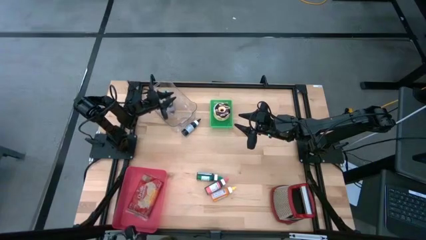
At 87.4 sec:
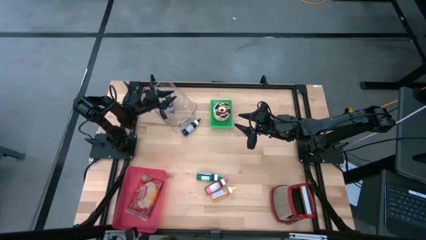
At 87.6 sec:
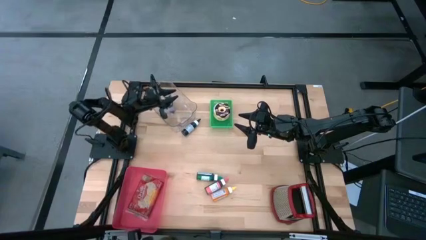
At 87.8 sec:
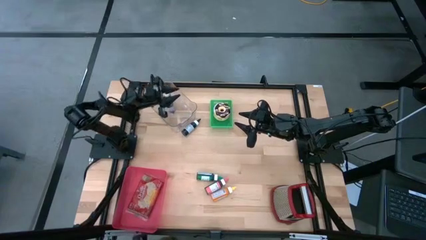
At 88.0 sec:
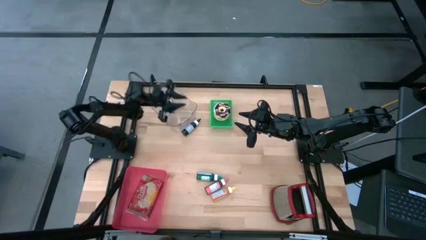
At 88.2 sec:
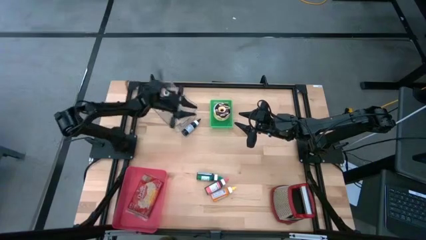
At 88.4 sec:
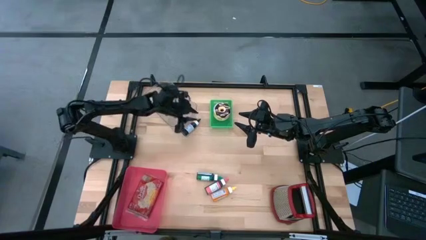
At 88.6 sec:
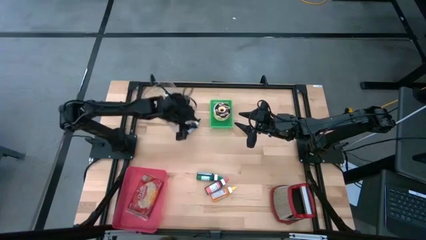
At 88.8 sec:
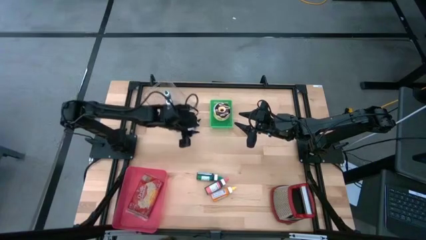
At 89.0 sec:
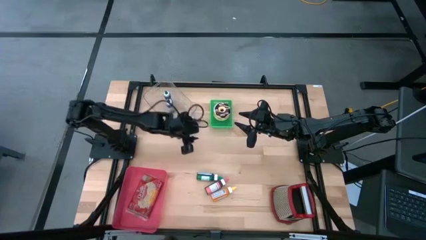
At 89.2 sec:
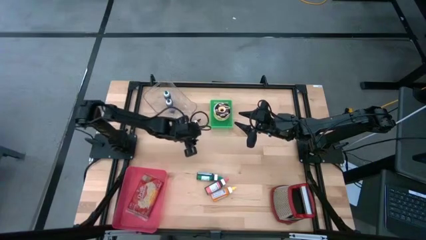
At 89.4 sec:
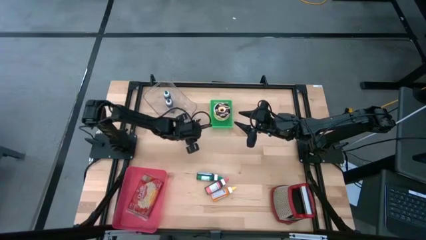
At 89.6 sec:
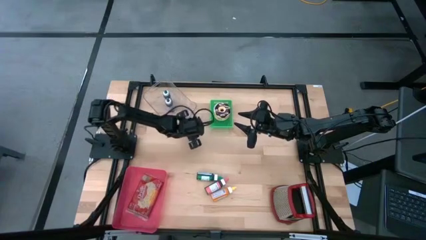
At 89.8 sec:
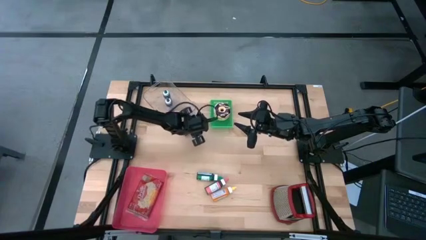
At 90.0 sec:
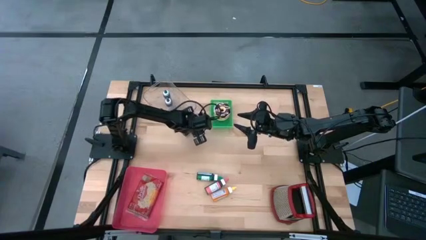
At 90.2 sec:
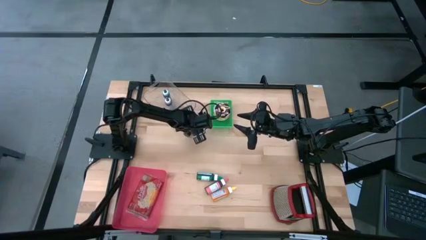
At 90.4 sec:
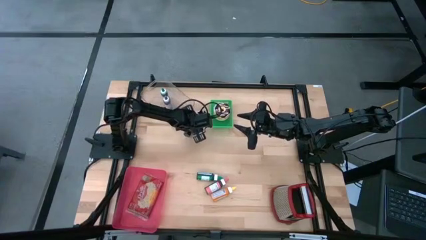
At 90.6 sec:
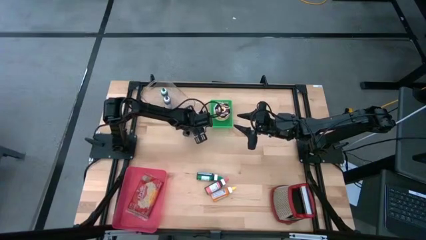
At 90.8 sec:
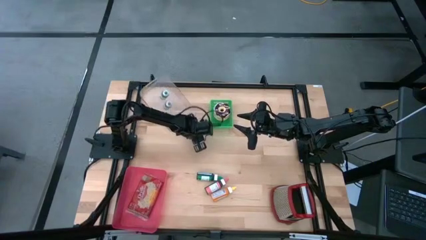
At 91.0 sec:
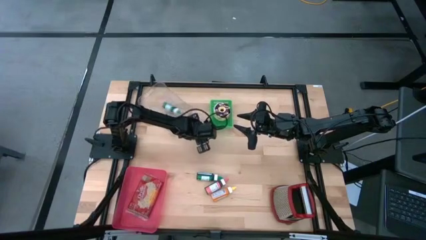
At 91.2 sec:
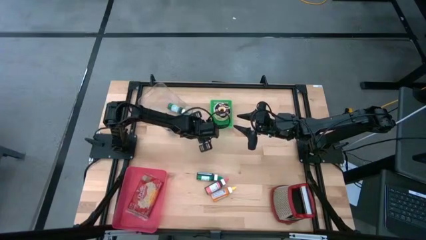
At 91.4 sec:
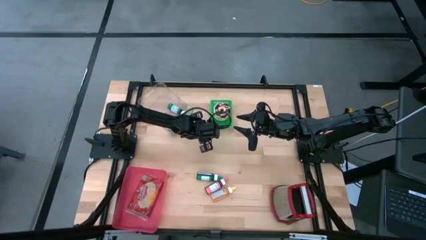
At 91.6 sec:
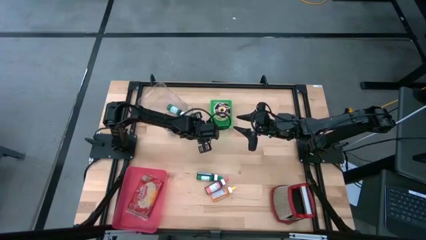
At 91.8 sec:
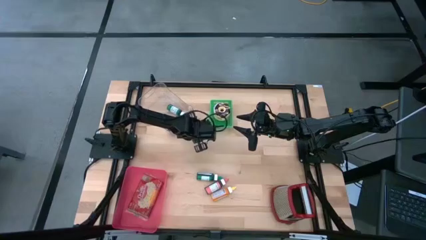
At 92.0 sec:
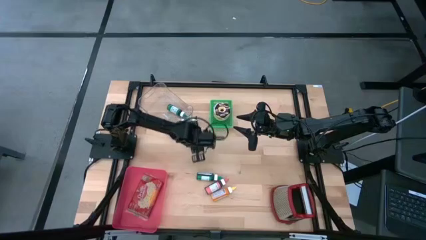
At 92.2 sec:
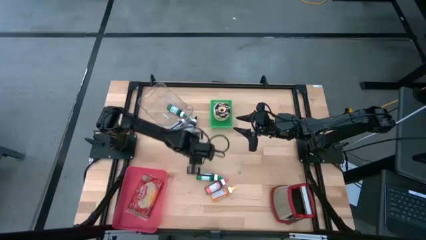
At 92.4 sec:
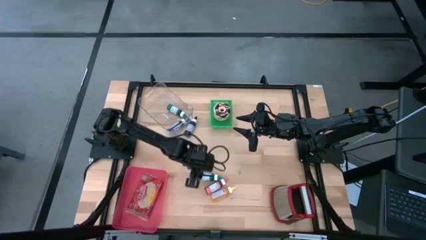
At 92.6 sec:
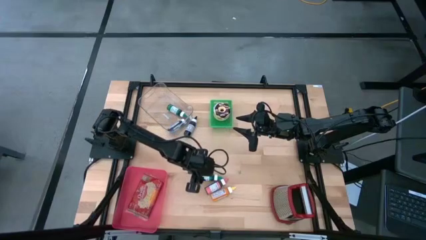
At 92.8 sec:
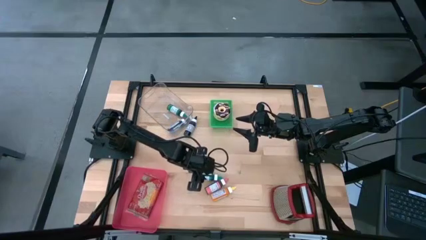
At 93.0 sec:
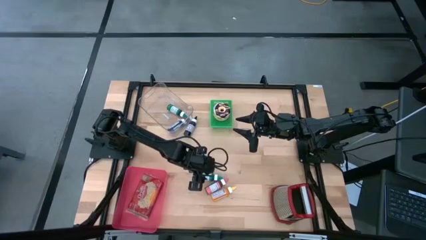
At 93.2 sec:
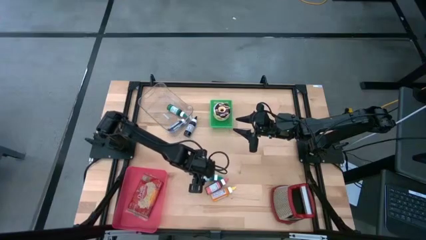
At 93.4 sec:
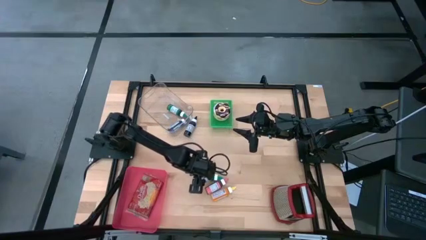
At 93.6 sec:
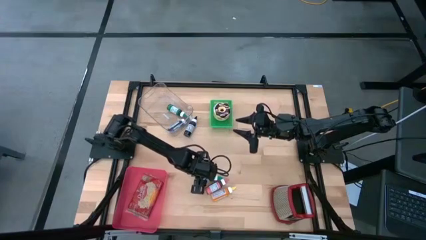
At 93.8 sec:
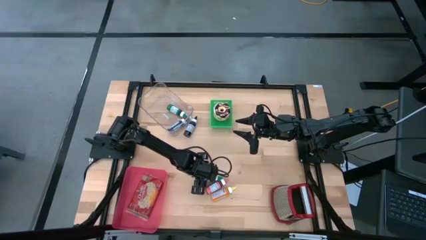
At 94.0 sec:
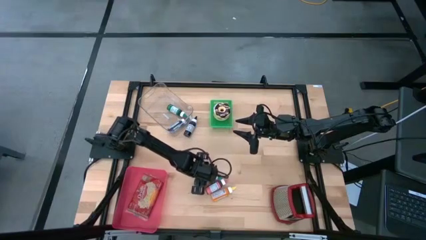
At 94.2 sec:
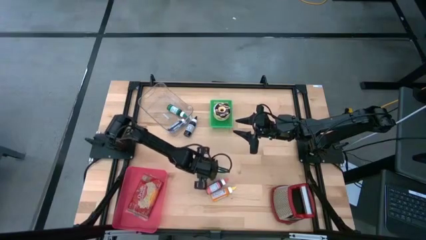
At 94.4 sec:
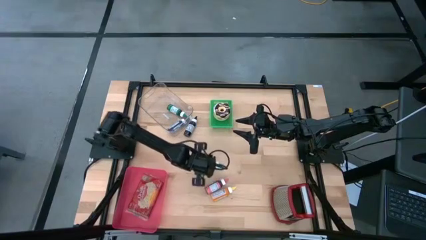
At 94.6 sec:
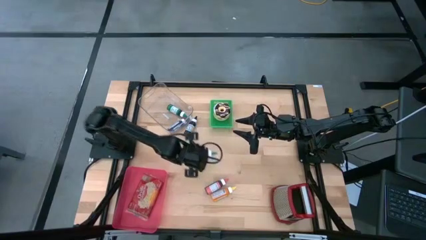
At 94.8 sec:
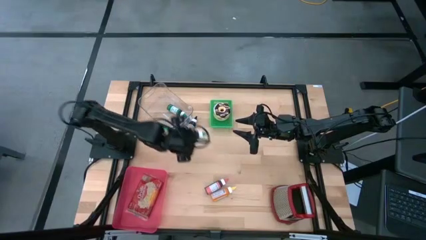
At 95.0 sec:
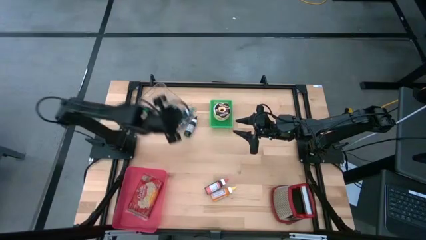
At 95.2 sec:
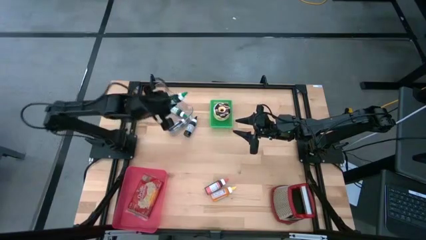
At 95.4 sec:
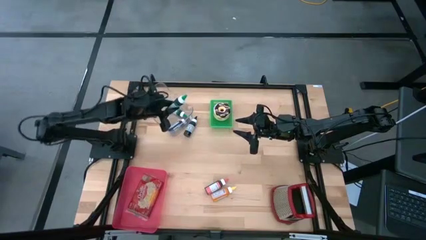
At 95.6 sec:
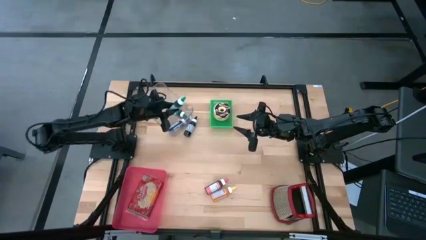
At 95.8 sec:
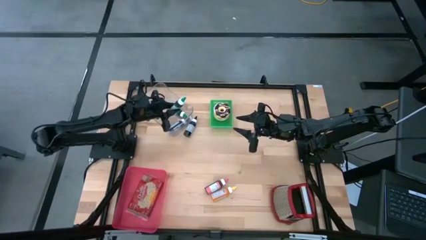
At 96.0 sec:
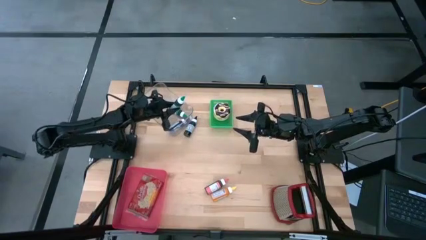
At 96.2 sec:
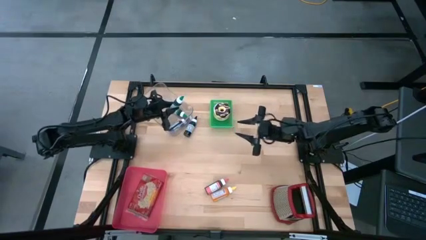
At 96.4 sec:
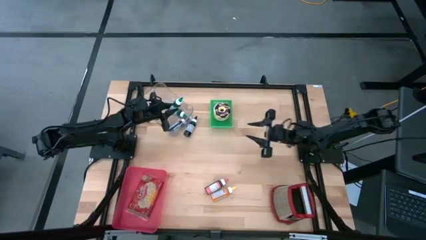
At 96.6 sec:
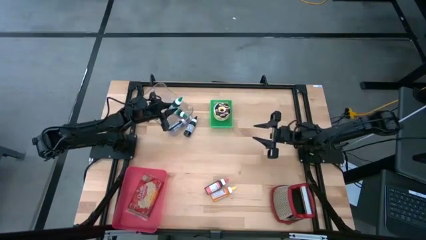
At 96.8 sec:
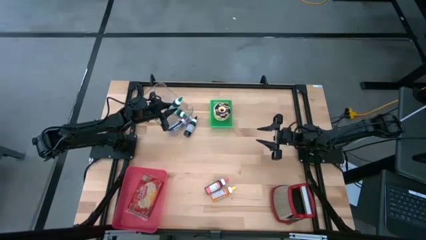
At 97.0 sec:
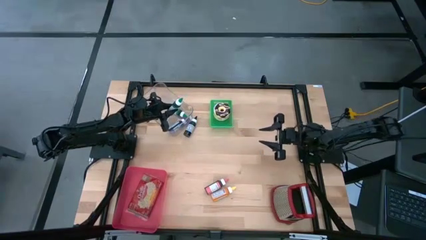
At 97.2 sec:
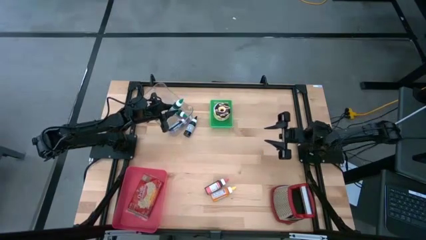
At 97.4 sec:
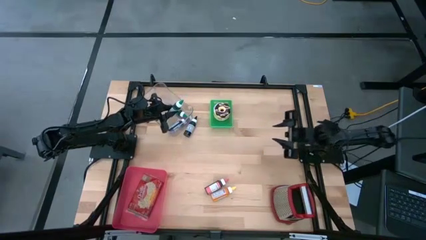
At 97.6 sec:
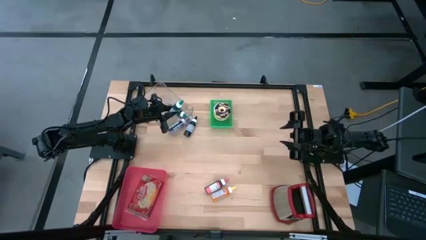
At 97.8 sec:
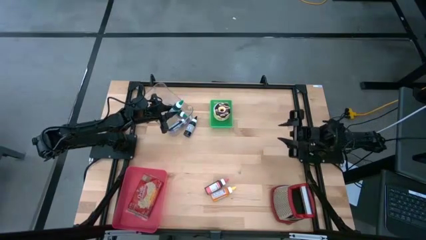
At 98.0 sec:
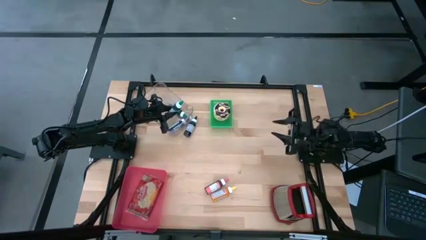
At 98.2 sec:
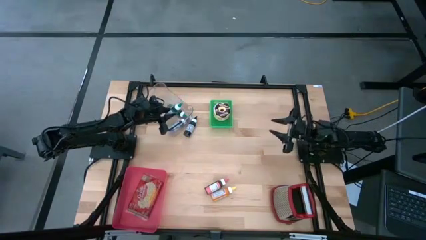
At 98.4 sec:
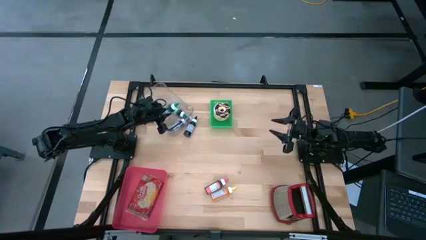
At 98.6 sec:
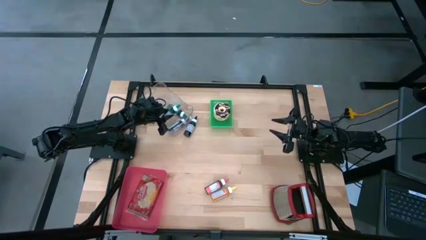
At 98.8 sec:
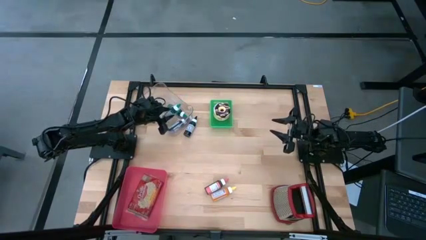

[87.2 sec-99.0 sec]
Put the green food coloring bottle into the transparent bin

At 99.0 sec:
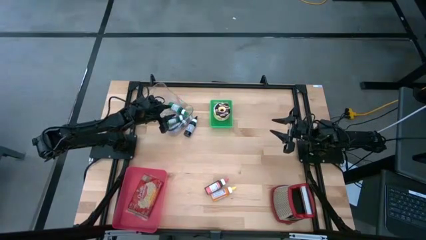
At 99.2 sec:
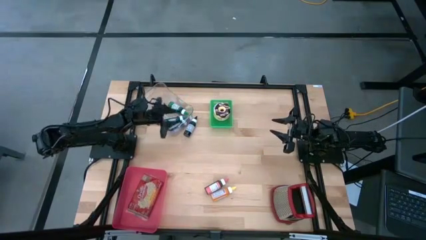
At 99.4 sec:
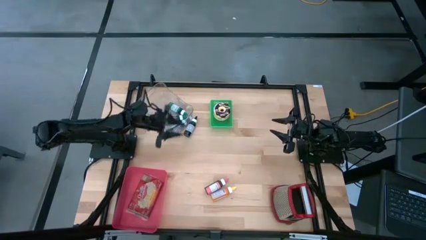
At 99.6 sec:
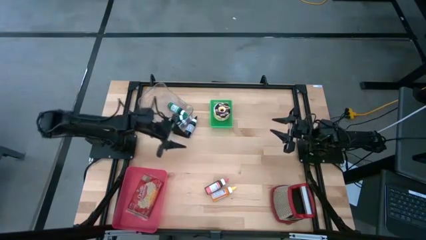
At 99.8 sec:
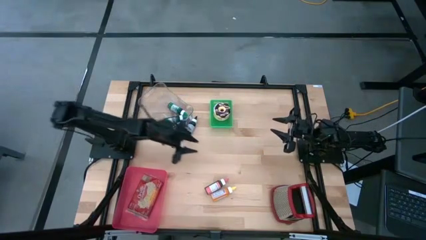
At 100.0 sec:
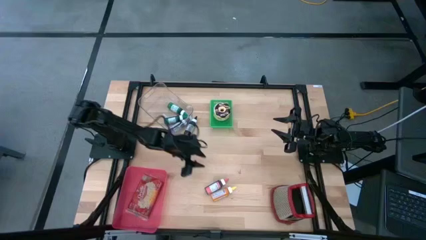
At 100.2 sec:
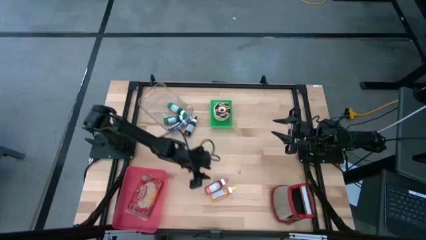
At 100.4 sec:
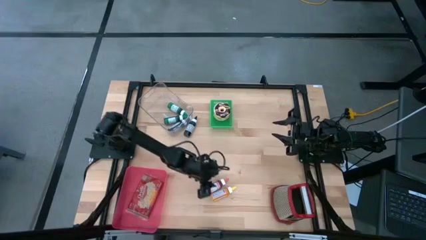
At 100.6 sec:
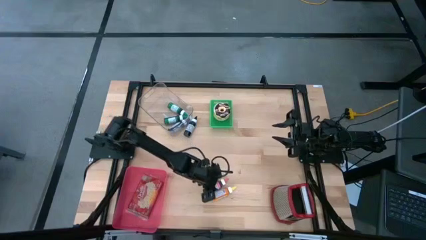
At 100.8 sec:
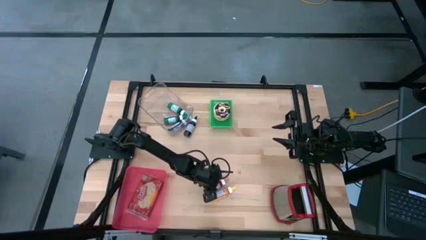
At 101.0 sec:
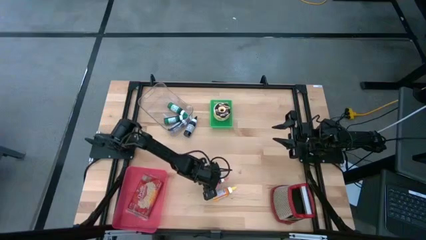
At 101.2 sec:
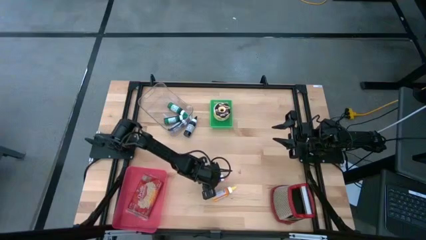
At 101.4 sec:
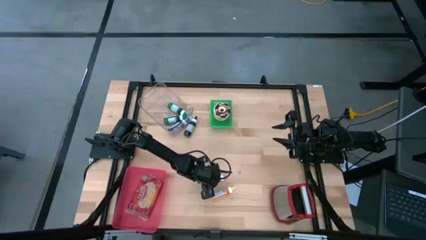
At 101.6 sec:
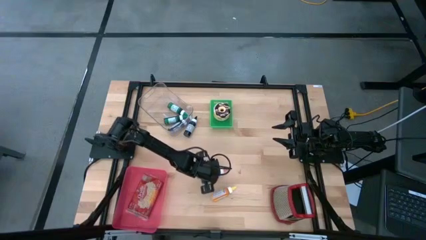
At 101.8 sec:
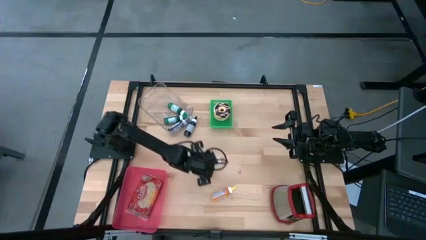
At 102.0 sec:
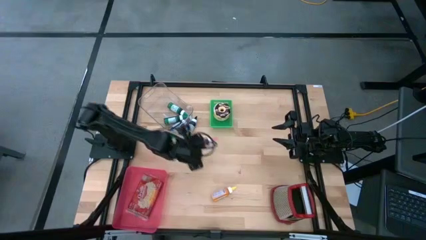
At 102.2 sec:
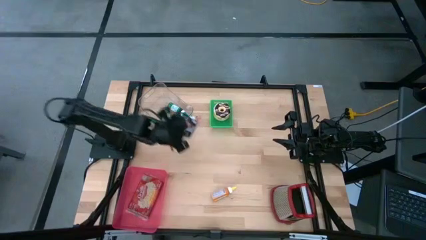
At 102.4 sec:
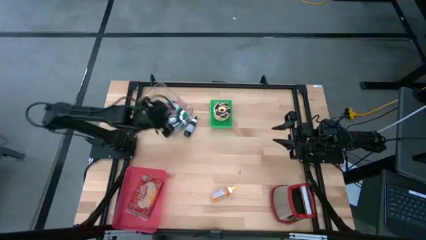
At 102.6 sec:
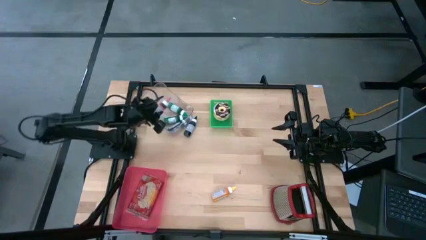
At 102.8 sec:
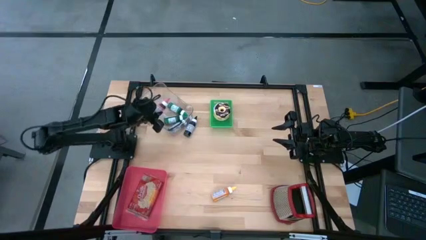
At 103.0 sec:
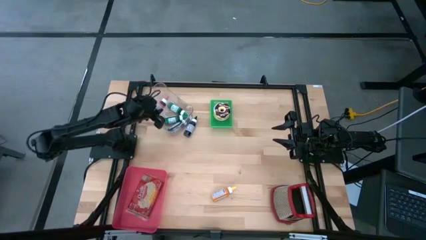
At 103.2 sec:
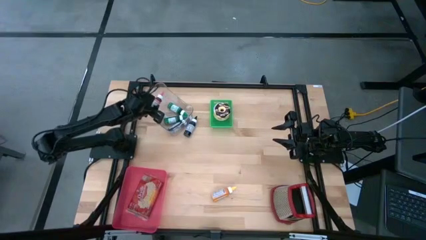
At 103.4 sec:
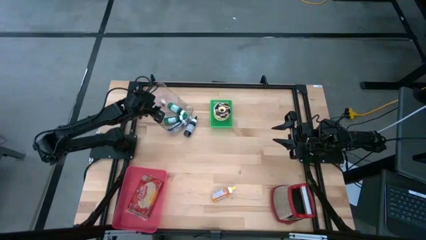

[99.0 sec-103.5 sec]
Put the pink food coloring bottle into the transparent bin
